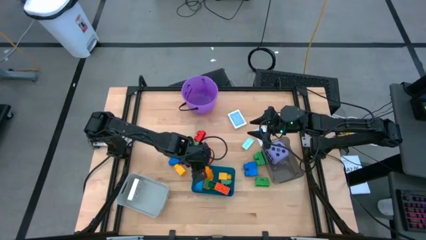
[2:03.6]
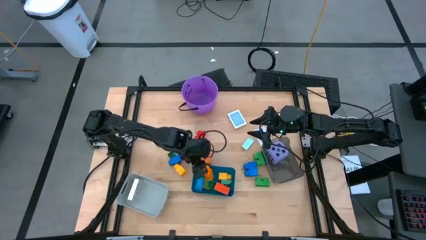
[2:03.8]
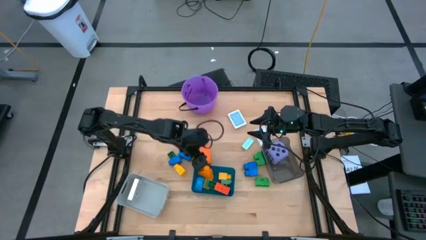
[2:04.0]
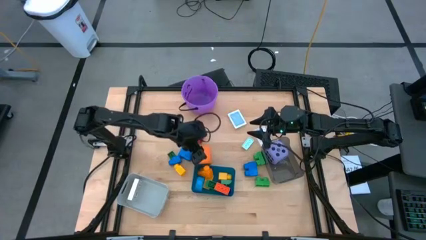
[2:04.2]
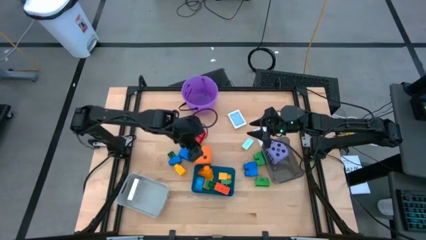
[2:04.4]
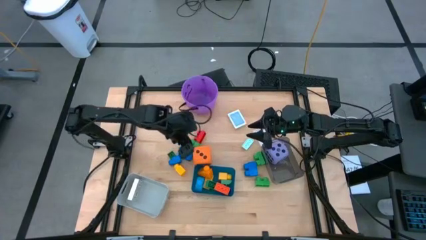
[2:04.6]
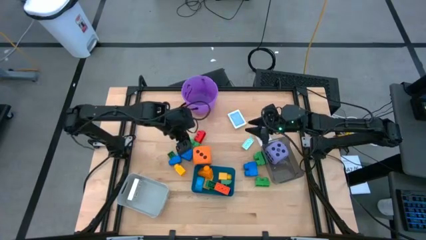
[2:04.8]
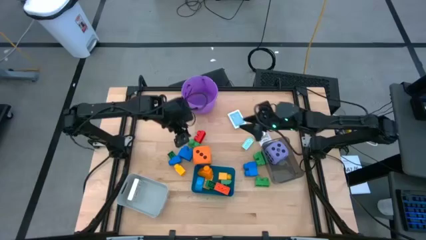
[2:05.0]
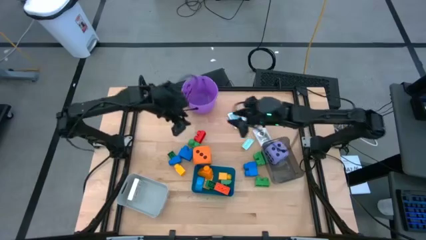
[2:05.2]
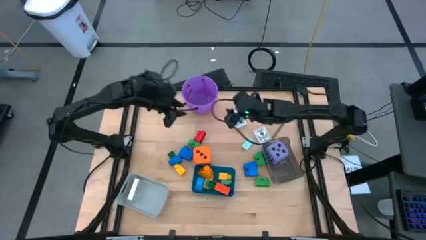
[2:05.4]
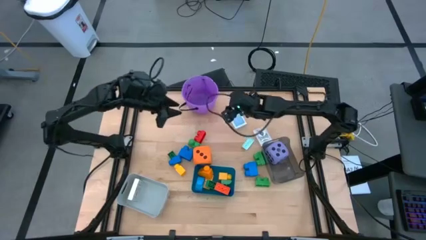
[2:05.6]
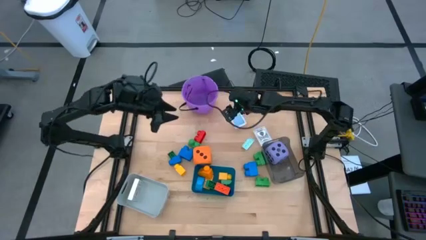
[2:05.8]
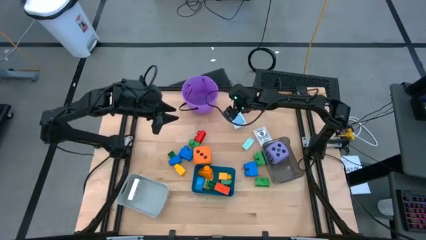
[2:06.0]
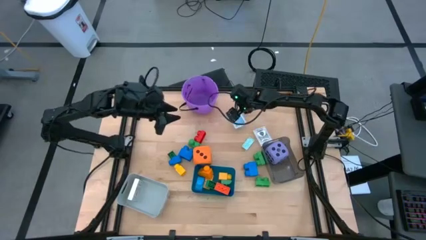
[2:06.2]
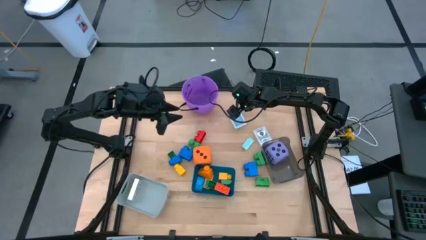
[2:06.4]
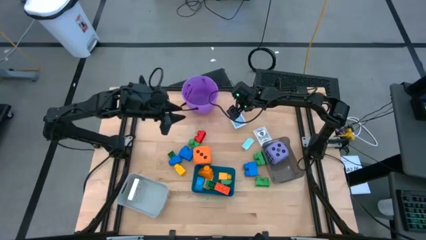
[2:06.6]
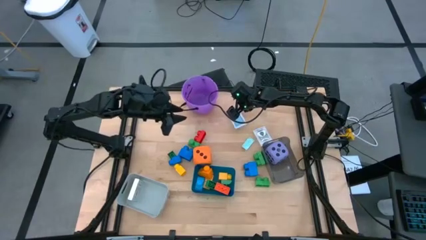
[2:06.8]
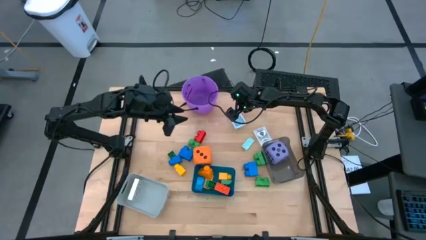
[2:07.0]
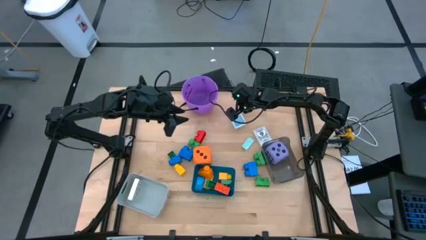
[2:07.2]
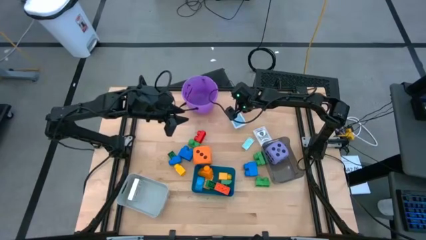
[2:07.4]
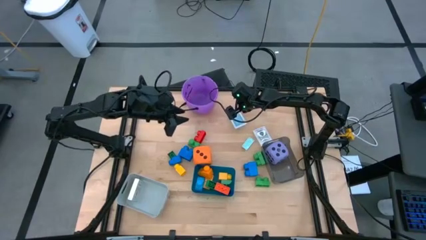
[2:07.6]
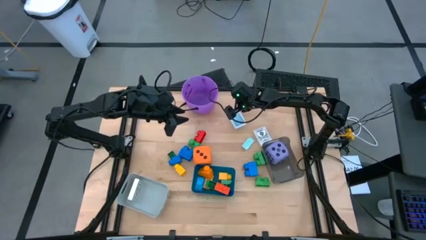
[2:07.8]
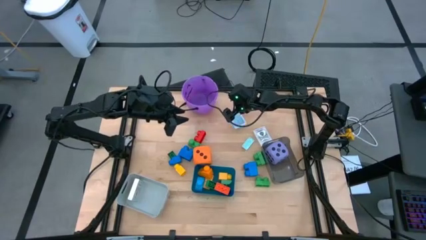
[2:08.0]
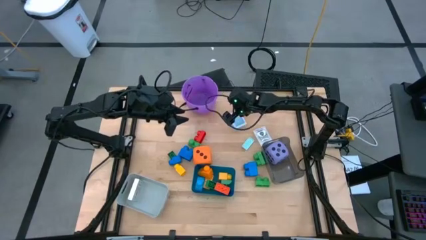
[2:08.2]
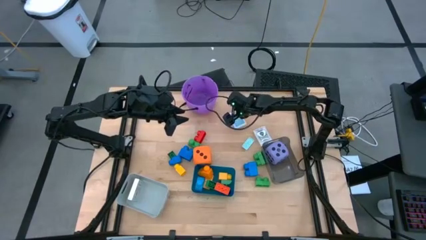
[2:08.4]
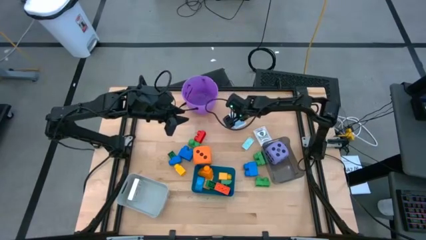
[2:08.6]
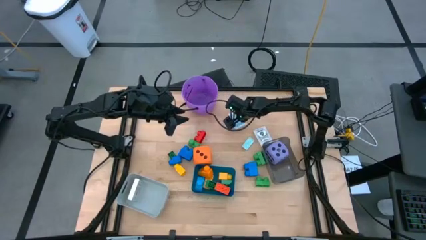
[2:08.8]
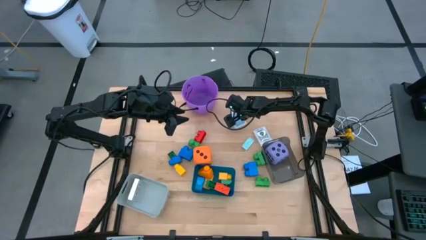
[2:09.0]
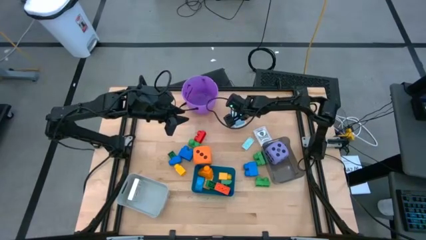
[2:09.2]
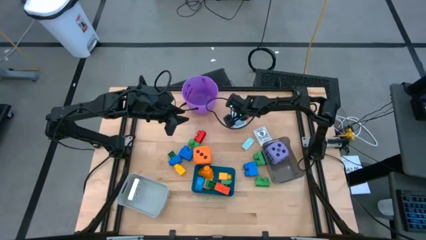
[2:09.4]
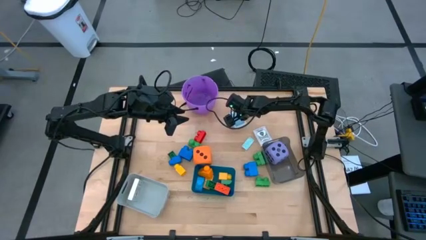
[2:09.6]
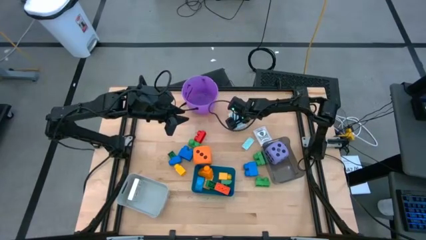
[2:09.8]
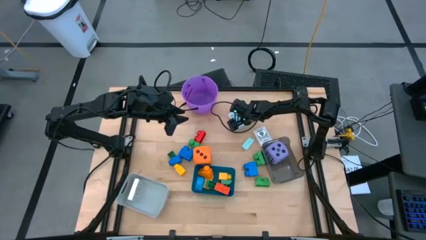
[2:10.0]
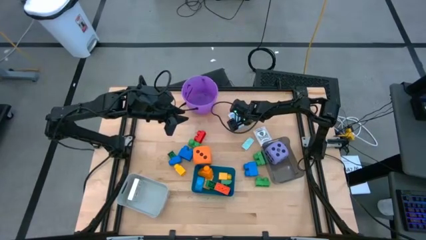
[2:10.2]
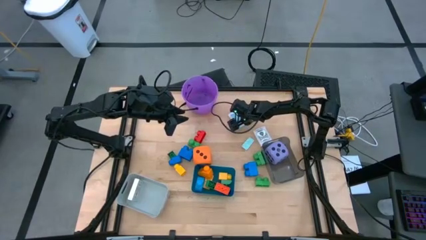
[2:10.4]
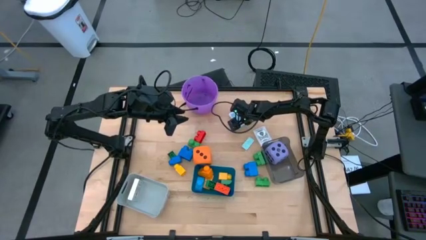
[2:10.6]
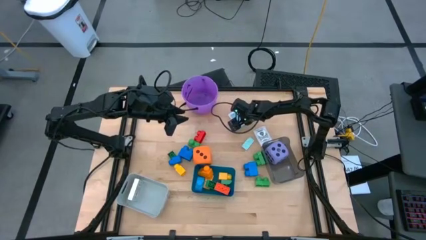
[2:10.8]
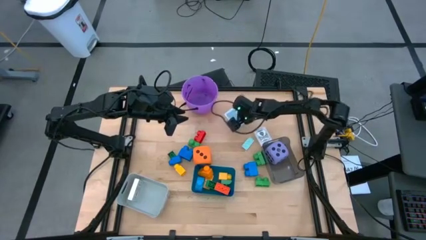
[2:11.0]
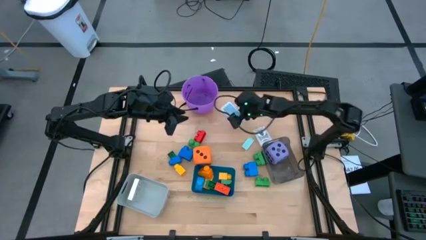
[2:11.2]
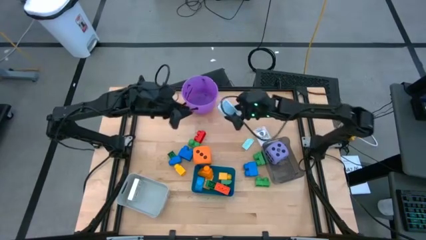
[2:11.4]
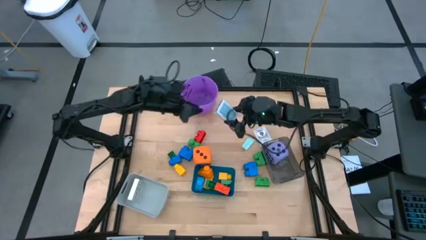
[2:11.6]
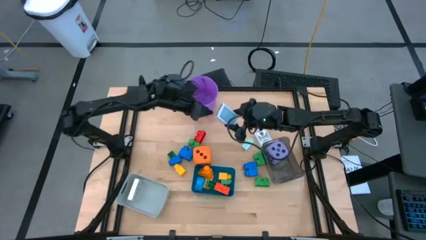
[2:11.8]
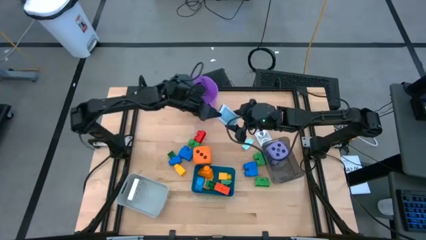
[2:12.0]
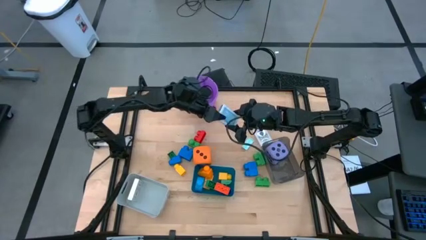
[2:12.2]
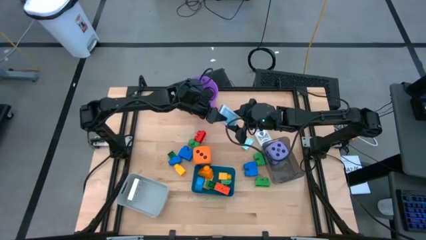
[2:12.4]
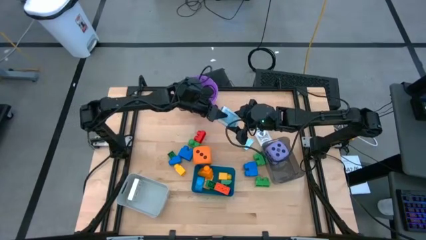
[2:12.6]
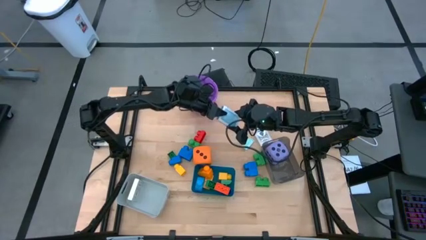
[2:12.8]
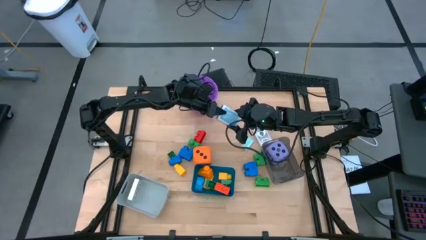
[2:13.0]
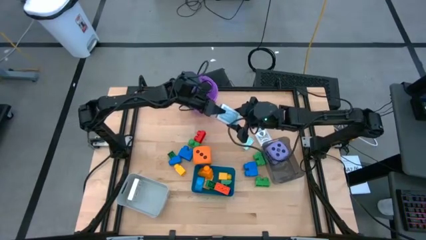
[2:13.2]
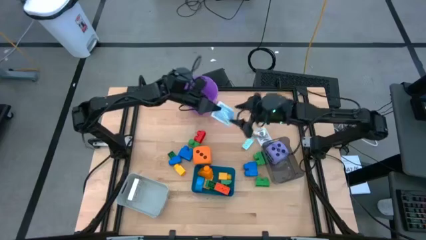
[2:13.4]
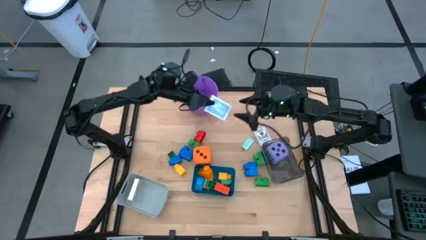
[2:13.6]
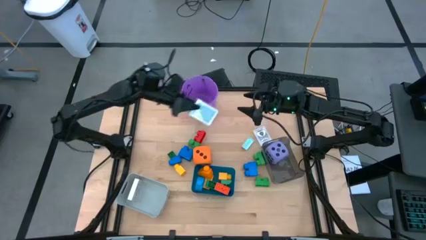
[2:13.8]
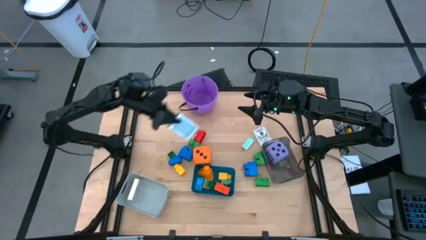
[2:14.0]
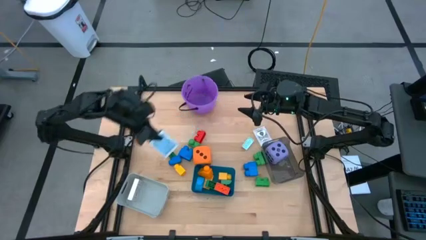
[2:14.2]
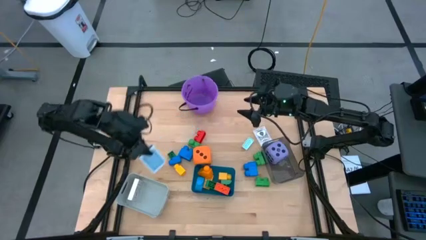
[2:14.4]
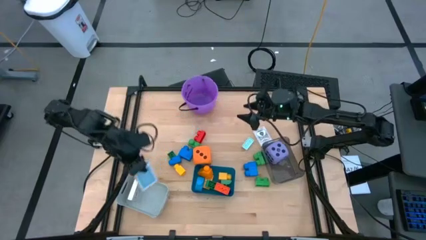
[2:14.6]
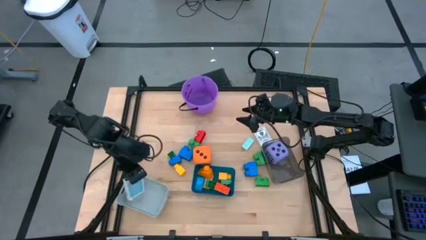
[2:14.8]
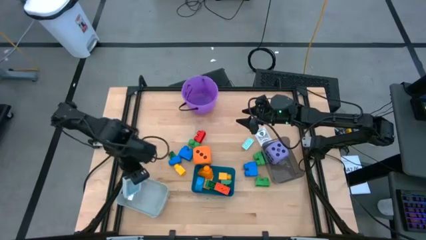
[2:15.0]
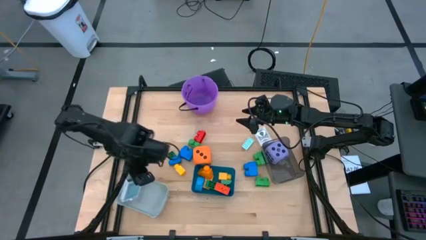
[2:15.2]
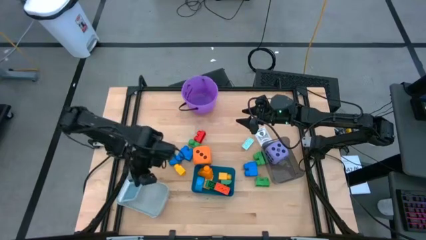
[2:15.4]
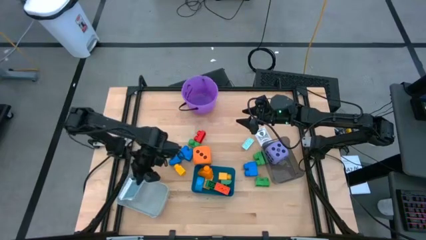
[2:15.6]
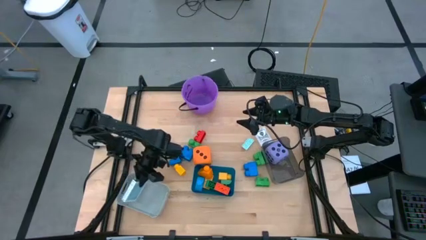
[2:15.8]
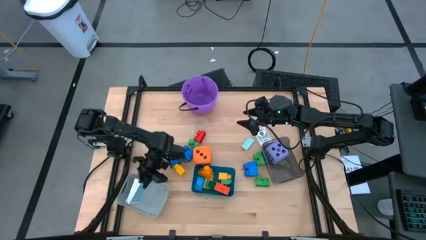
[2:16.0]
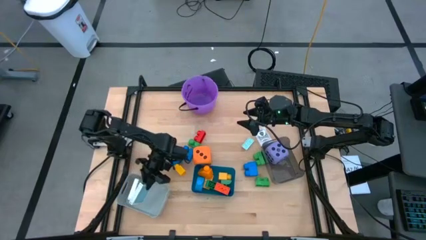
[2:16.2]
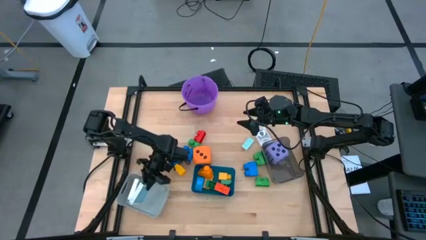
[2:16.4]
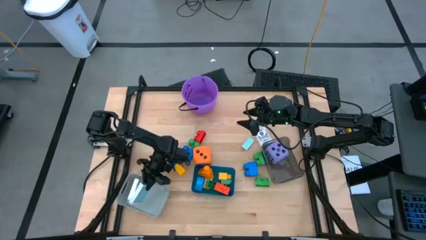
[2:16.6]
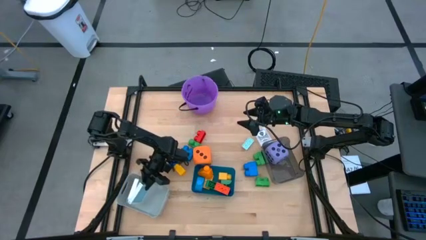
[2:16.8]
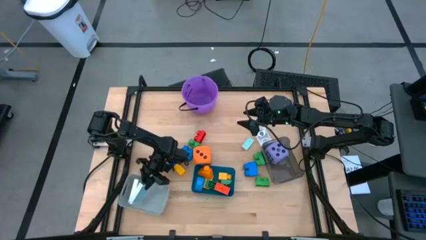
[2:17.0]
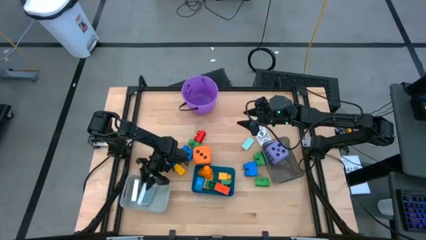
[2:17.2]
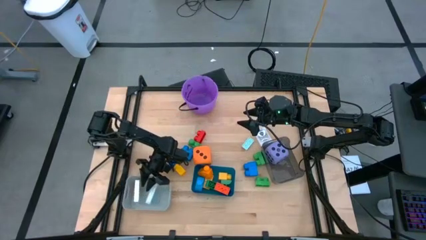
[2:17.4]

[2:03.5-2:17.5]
Task: Pick & Place Toys
Put the blue deck of cards into the gray bin

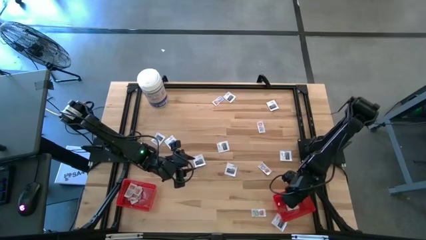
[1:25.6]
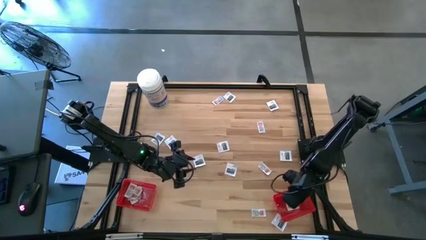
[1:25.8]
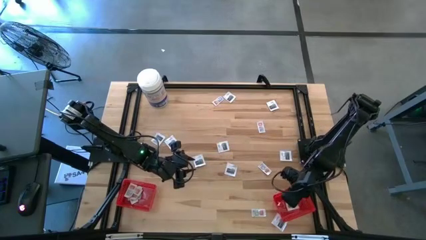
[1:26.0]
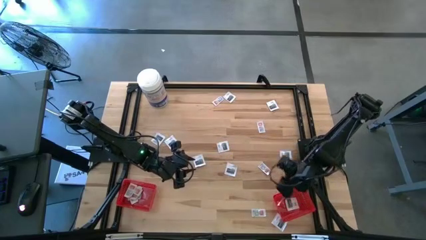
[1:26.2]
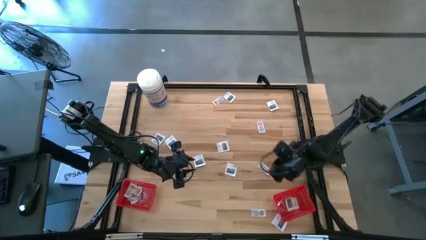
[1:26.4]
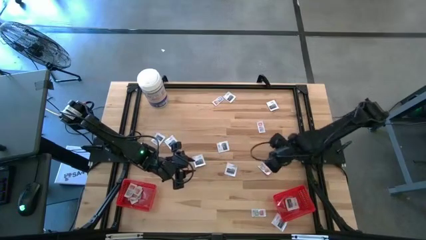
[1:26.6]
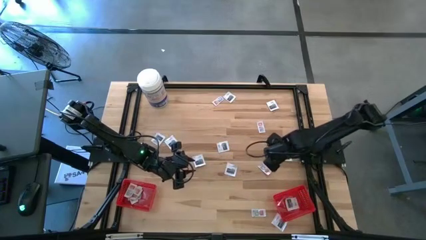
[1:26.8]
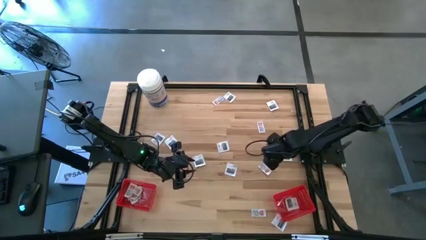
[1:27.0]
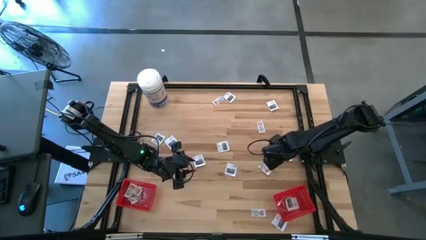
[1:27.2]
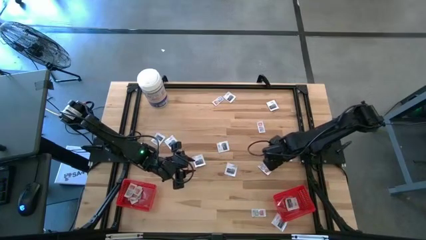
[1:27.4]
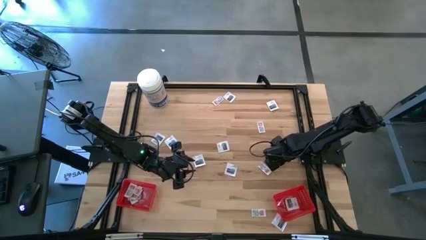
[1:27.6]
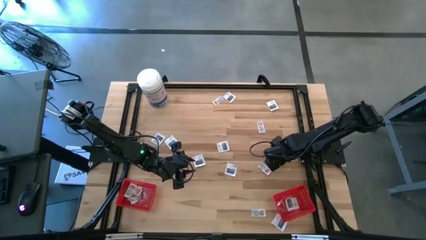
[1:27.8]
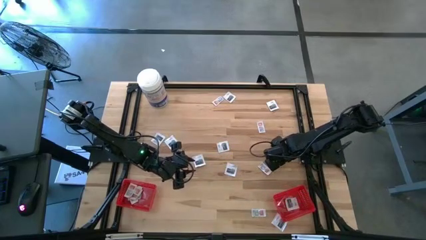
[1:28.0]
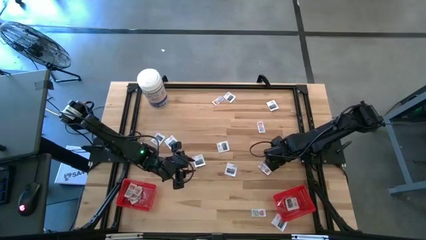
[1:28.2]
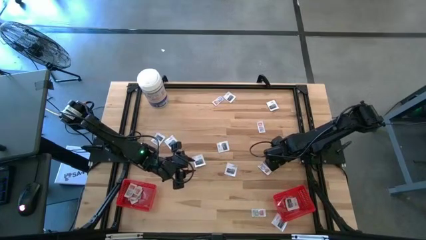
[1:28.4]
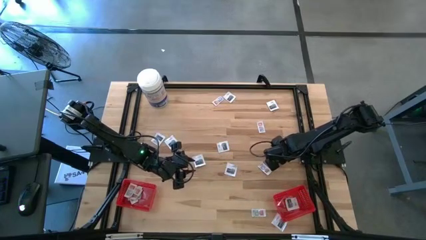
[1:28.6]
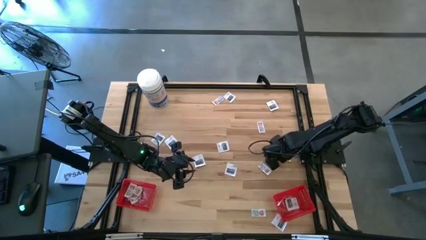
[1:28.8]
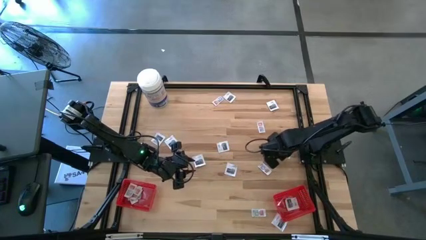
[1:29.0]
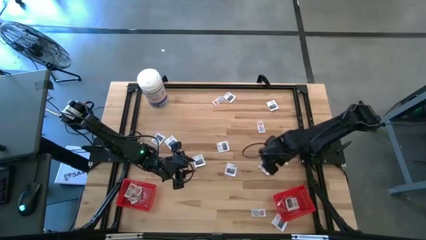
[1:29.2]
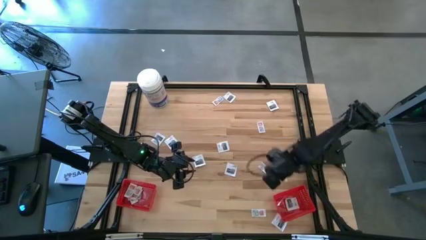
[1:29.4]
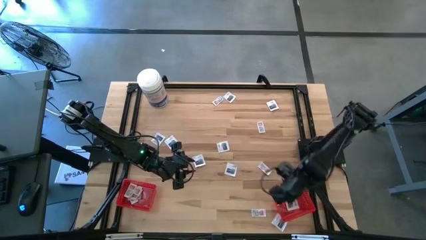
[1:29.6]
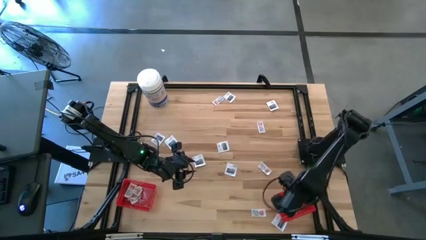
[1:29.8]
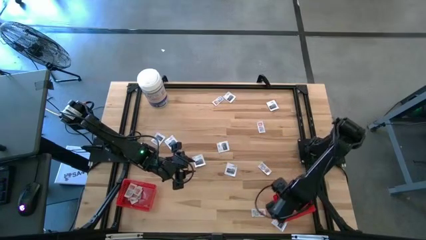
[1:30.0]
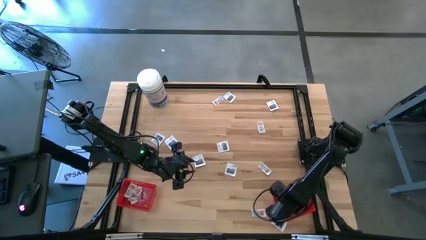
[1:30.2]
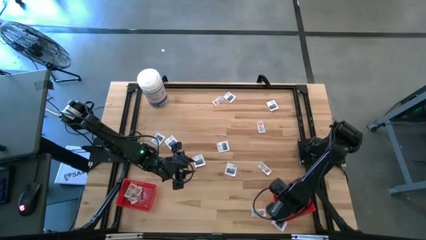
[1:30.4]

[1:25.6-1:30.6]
Task: Pick & Place First Aid Supplies
Put the towelette pack into the right red bin
